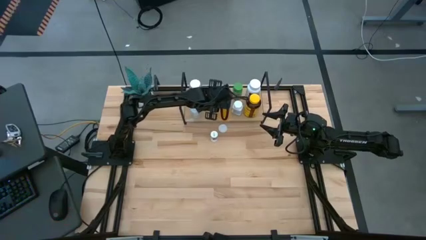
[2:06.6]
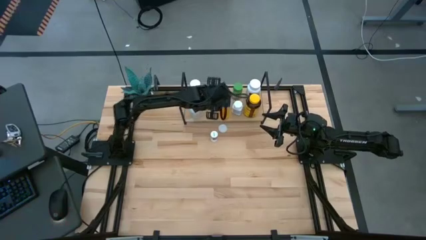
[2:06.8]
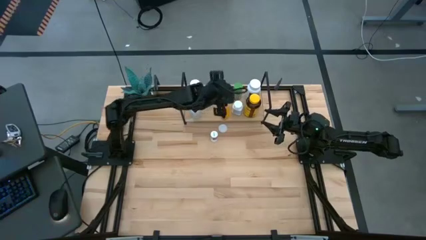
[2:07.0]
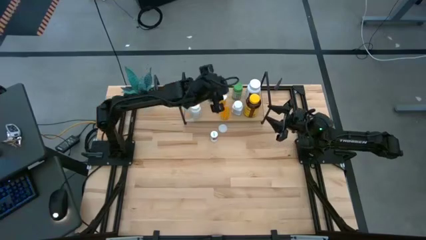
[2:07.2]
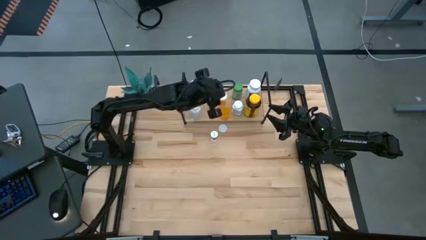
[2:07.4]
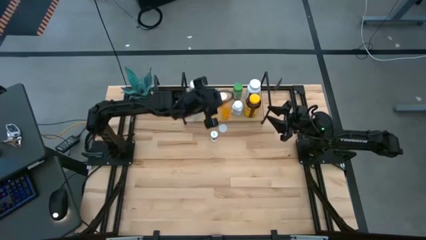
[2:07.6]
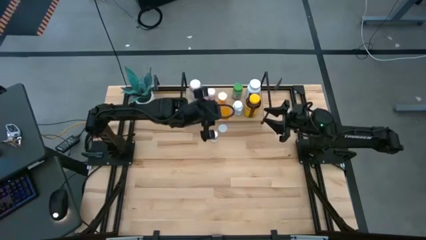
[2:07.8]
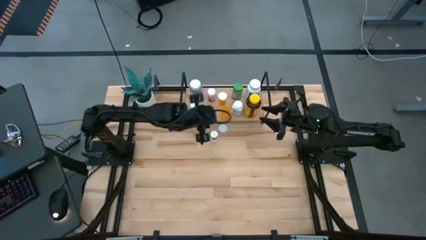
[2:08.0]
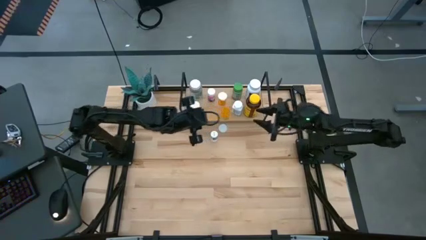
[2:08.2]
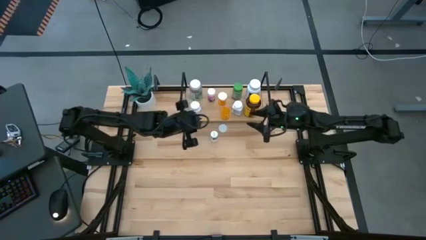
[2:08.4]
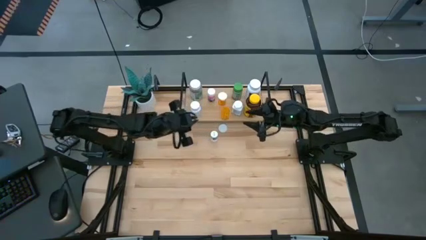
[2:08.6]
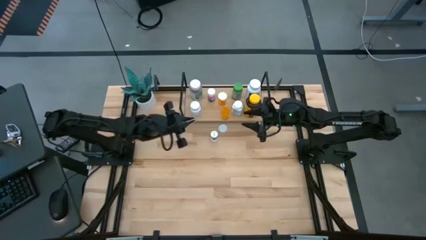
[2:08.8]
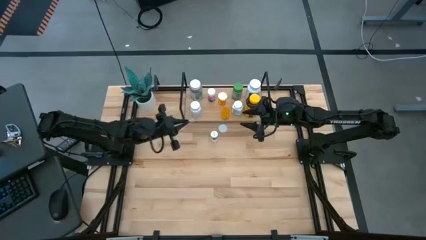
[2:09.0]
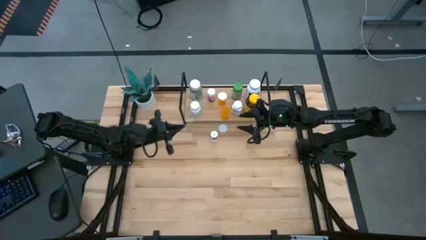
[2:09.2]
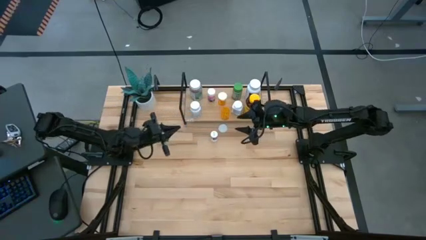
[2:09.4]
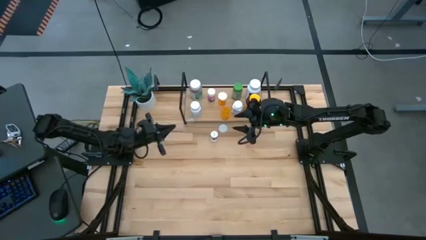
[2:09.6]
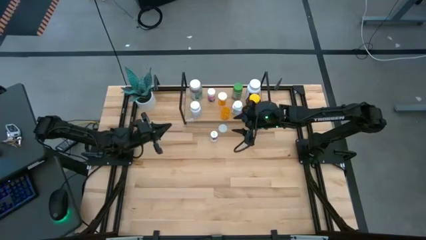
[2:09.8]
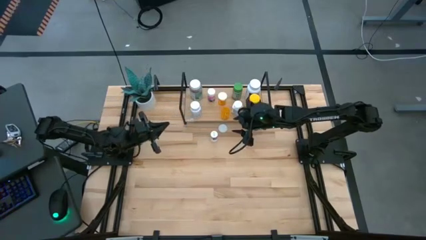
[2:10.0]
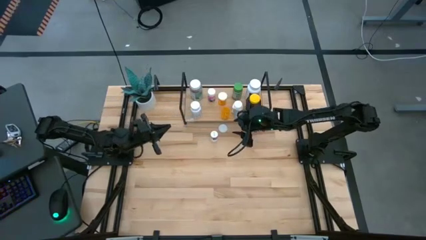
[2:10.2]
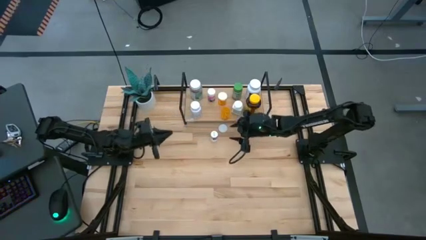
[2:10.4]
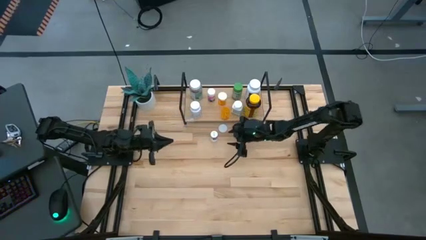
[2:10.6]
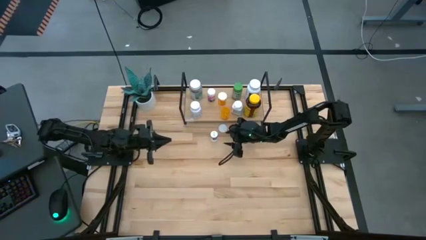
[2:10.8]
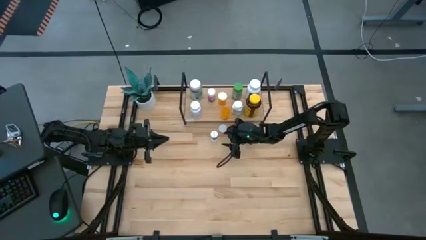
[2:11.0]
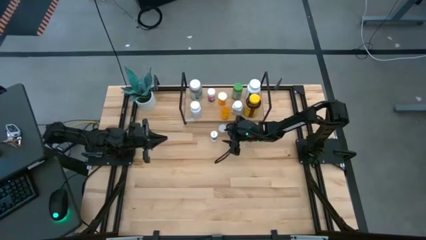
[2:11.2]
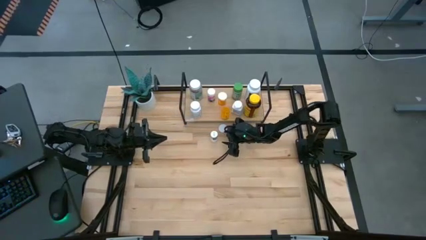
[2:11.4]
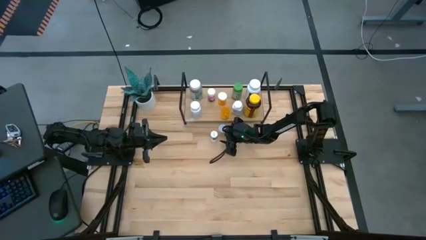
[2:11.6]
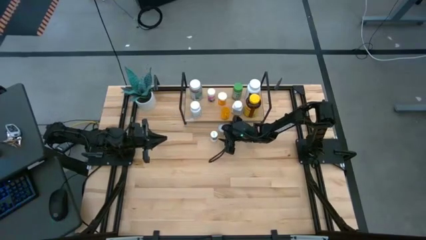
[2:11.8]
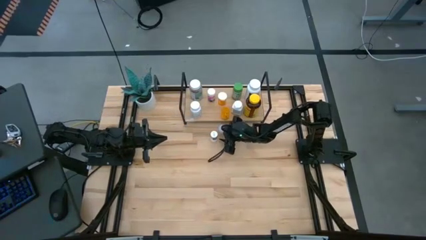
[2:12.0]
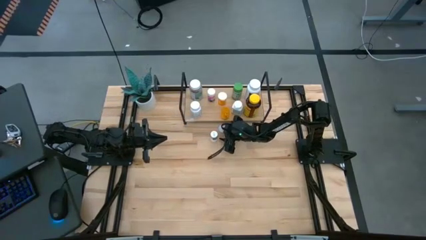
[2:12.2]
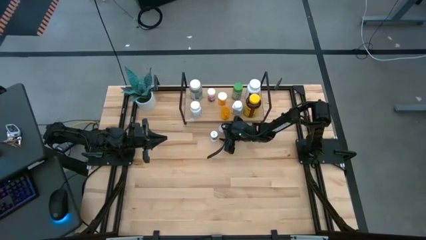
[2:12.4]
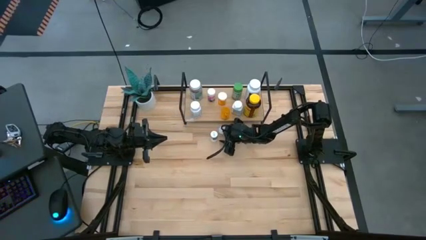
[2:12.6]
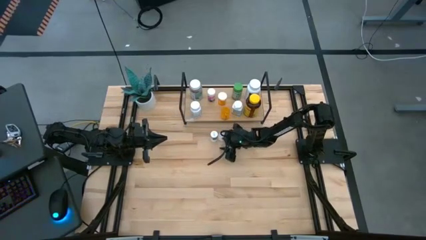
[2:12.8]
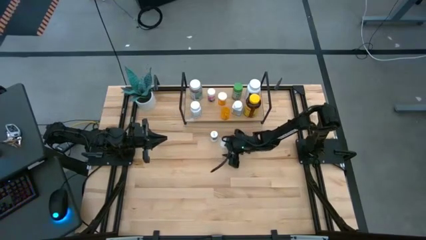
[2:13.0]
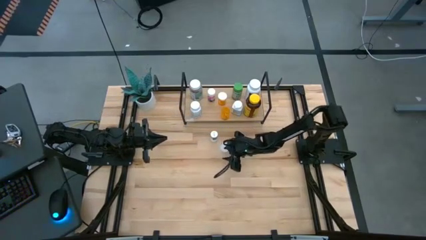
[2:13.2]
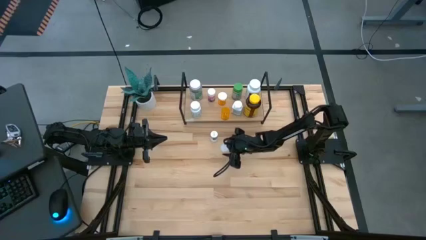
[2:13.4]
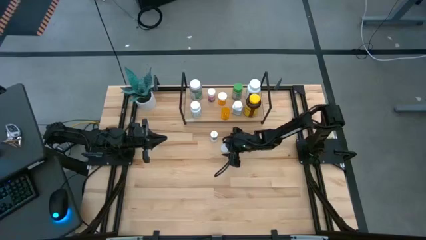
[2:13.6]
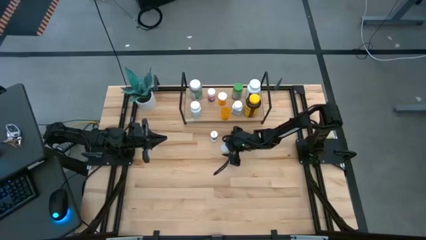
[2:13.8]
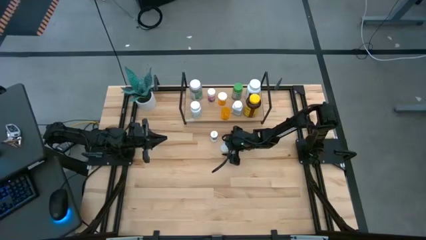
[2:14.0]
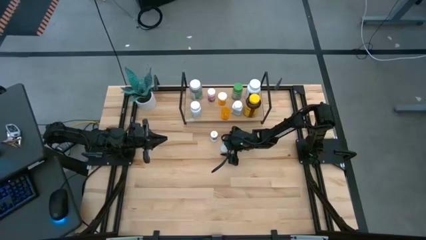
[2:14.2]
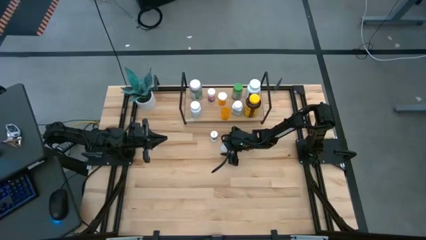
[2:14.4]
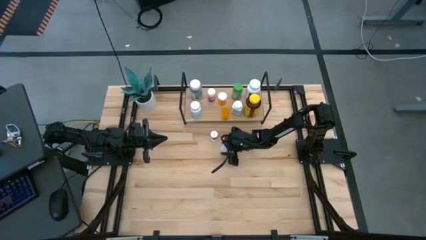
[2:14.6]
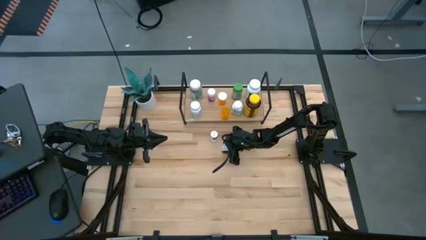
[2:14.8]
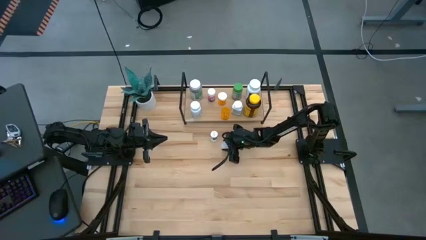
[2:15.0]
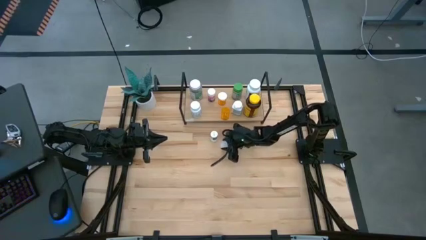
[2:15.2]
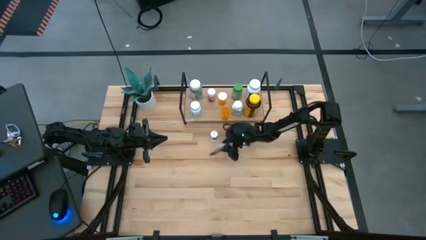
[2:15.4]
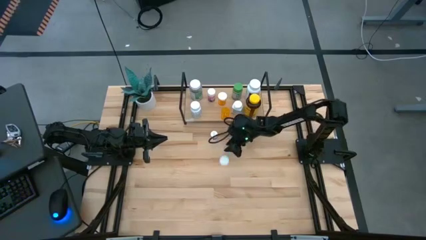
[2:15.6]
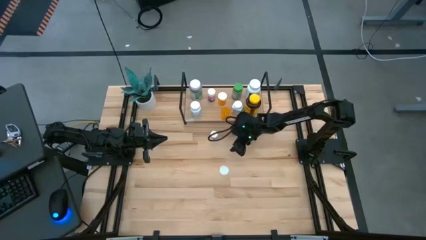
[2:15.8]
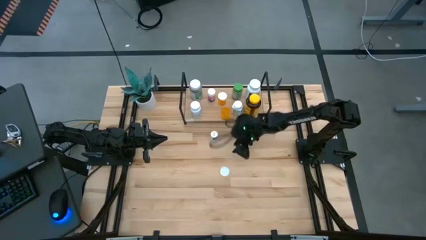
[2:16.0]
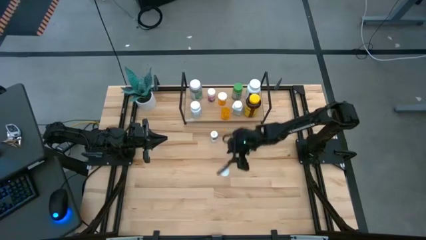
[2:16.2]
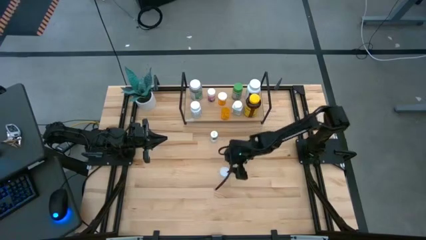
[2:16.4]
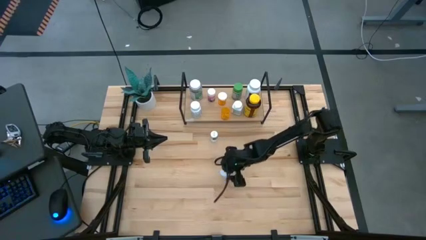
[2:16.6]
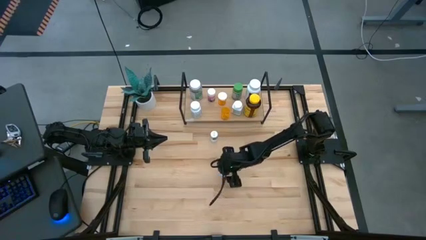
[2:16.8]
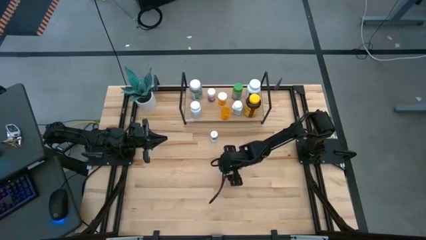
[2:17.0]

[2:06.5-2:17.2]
Task: Pick and place medicine bottles onto shelf by color
Close the yellow pill bottle

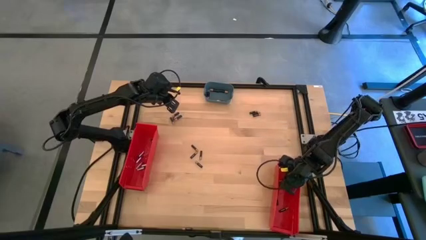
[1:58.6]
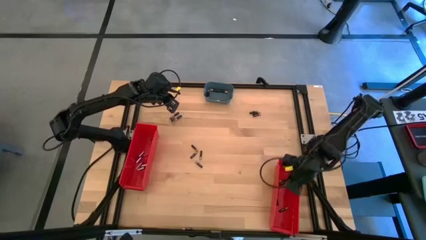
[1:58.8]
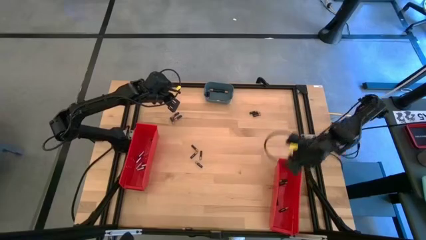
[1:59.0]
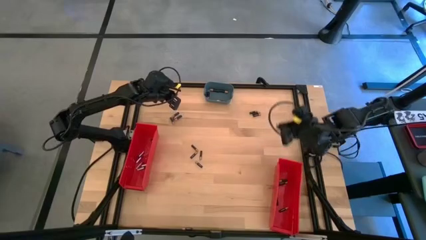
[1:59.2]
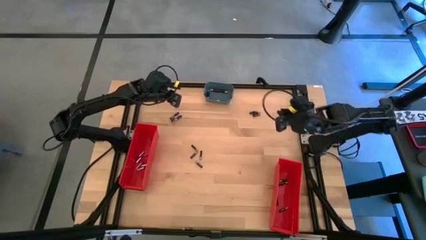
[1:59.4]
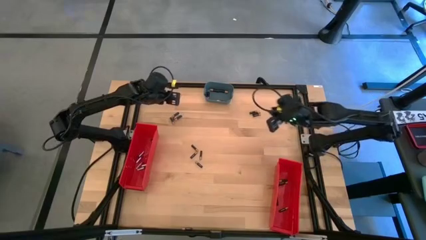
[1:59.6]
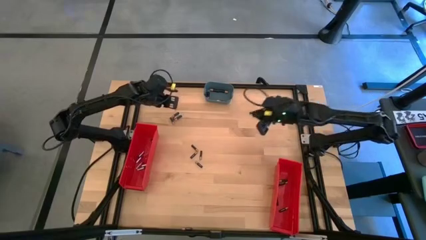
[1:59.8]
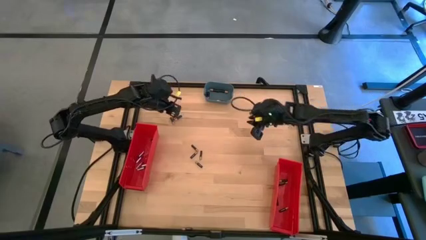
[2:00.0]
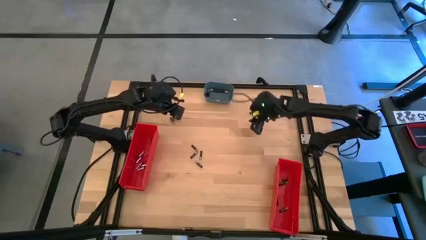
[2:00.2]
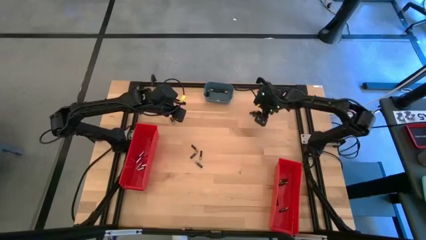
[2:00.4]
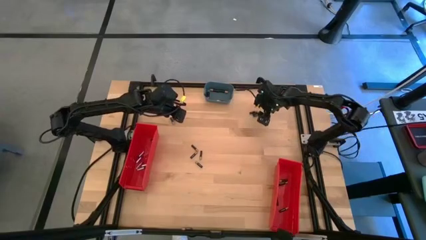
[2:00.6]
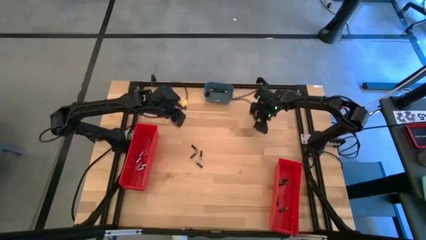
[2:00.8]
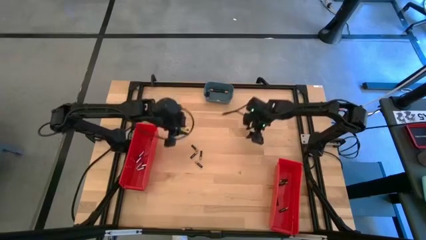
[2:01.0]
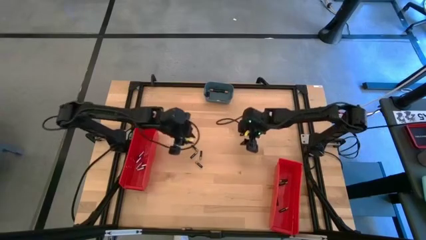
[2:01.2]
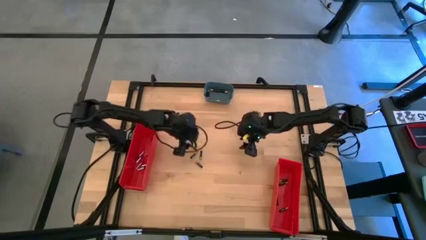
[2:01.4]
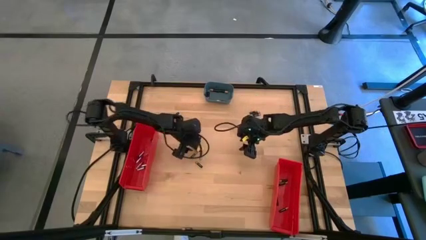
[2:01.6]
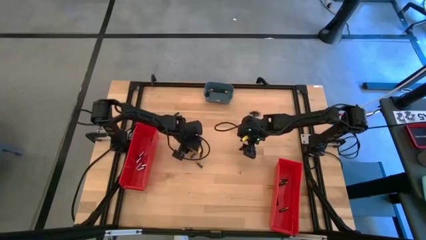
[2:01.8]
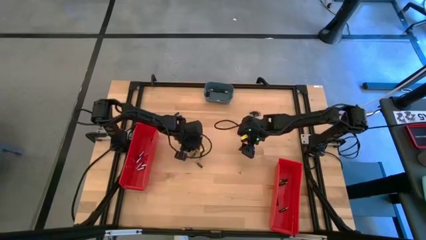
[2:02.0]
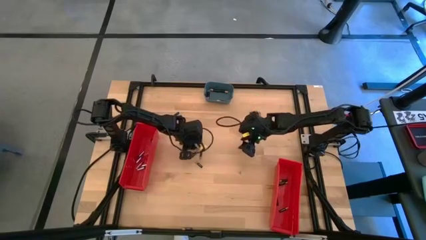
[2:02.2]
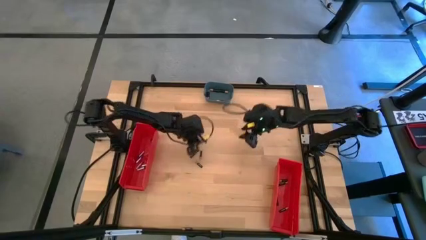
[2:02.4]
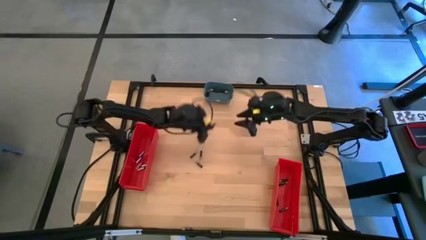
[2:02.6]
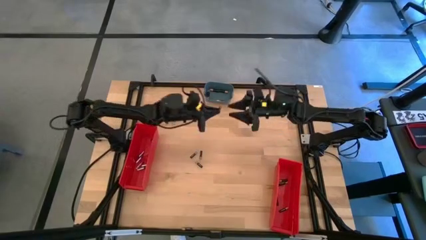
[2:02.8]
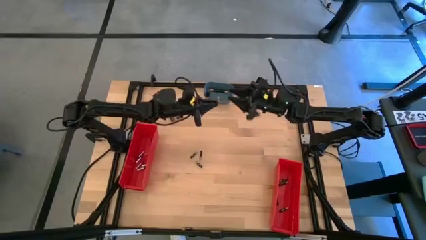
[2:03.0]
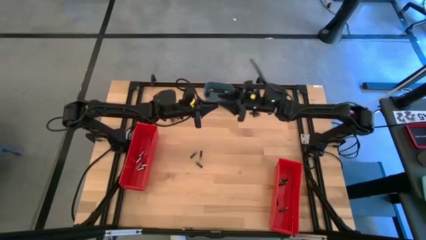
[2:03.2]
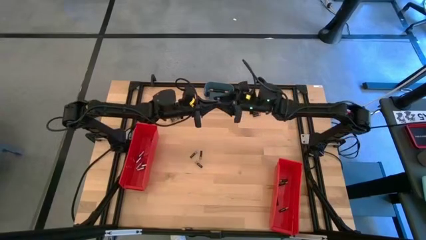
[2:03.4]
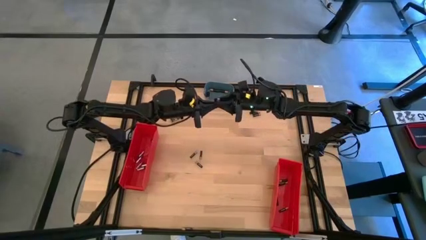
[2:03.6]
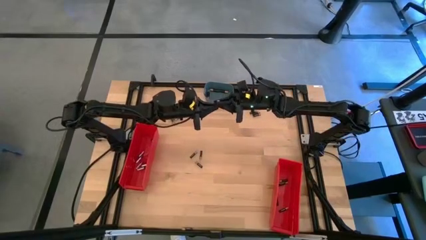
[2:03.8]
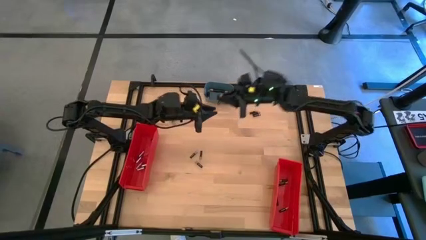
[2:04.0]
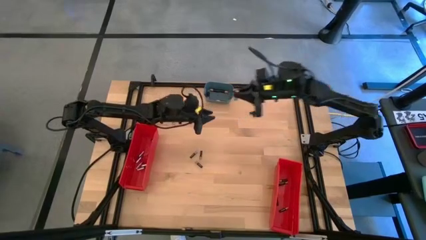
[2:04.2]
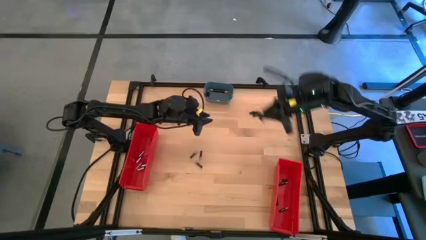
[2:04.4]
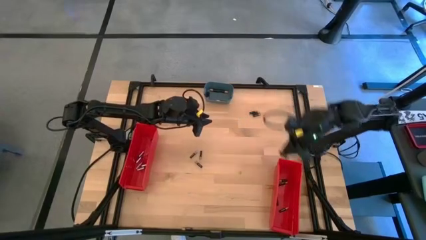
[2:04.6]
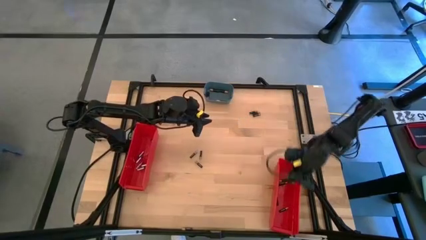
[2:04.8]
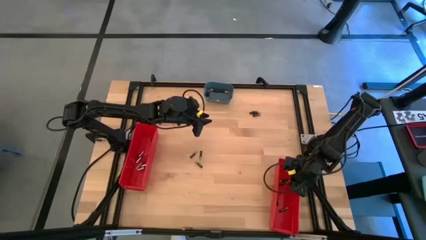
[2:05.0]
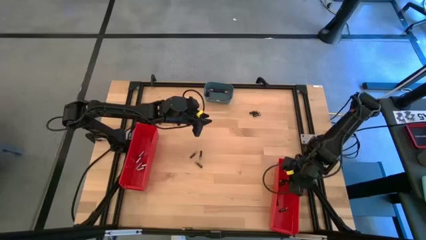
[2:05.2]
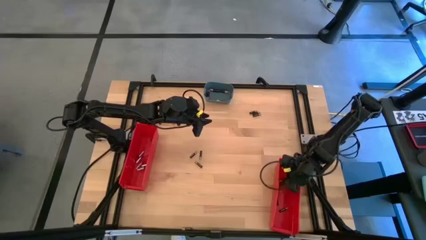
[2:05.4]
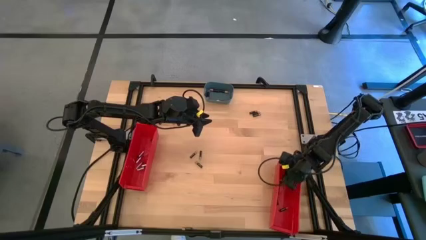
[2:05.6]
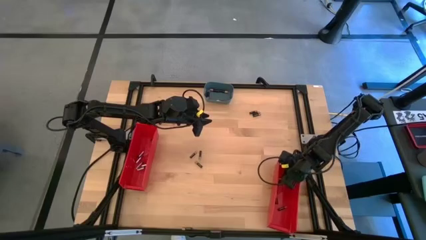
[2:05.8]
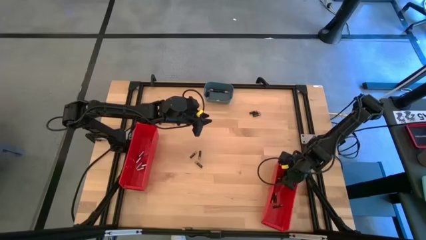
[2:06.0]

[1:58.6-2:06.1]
Task: Sort batteries
Put the small brown battery into the right red bin
